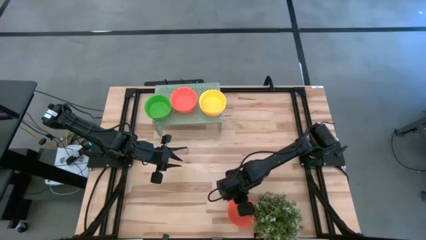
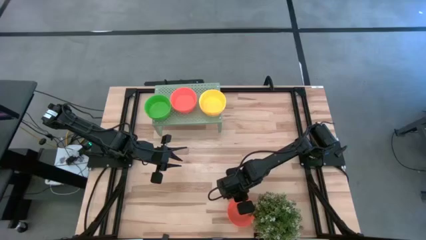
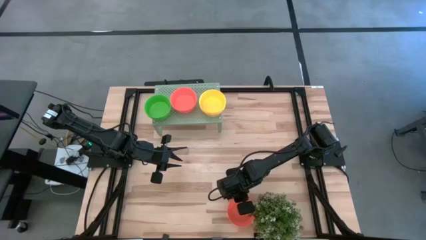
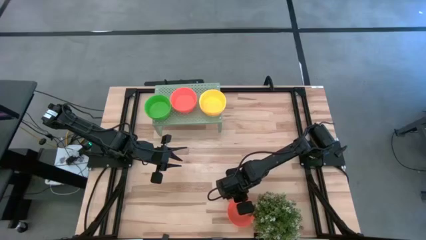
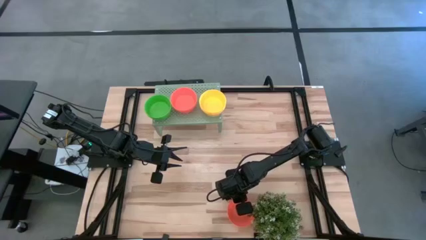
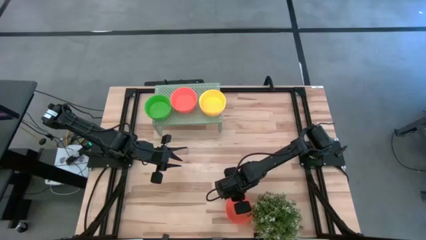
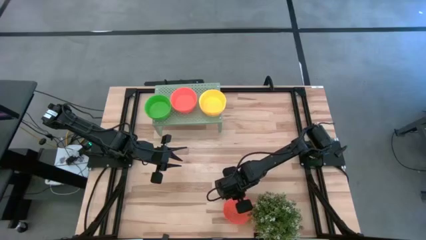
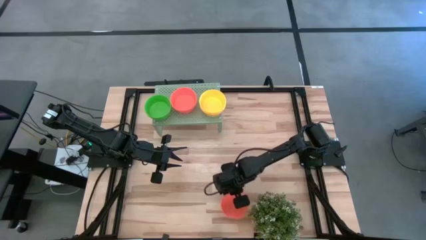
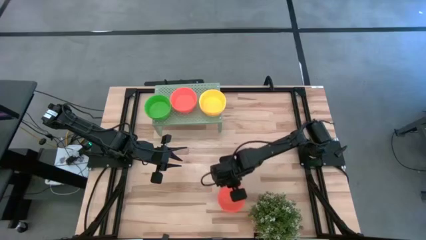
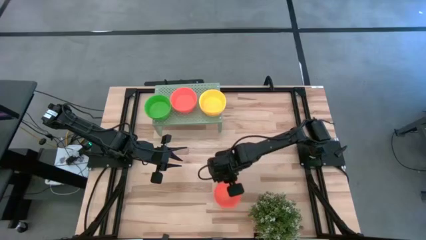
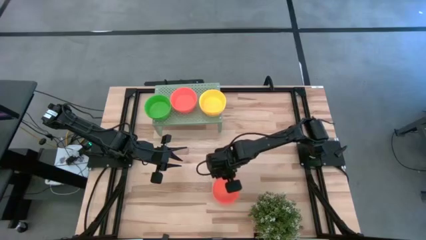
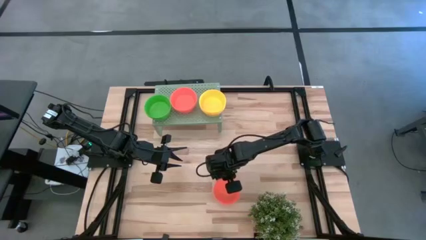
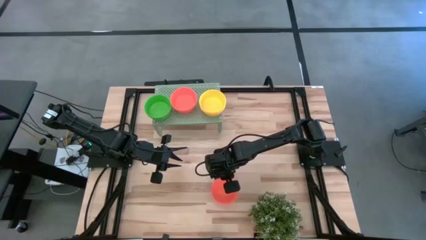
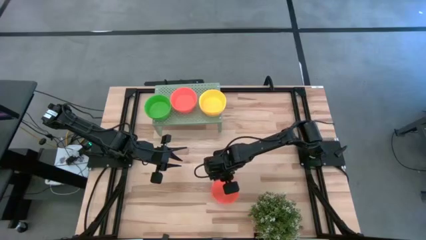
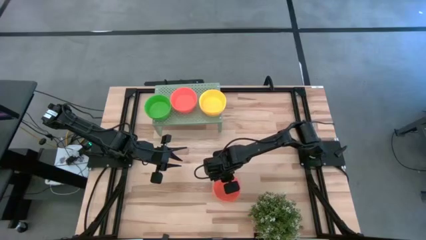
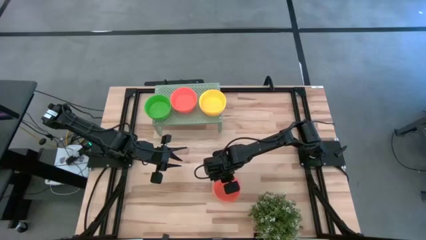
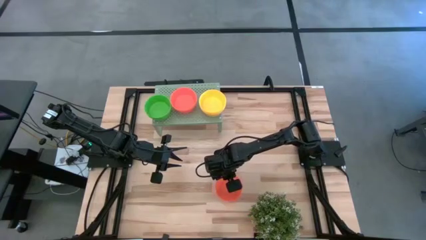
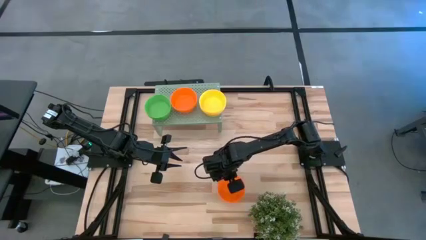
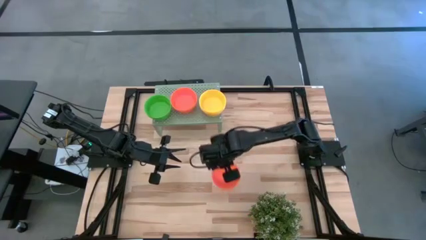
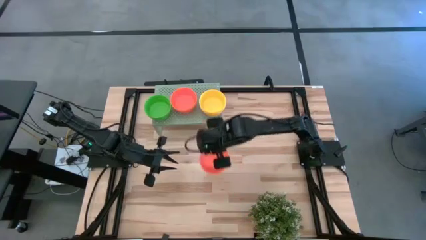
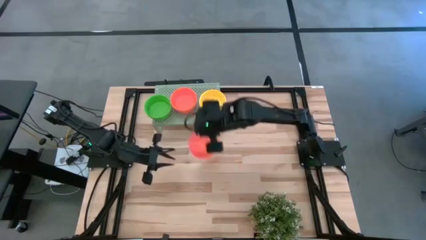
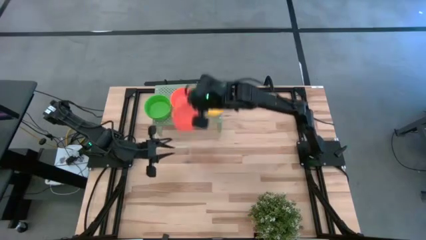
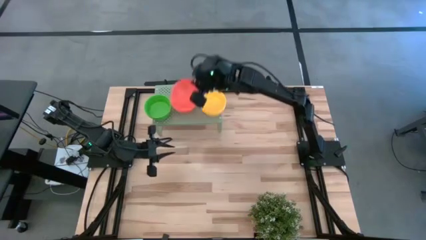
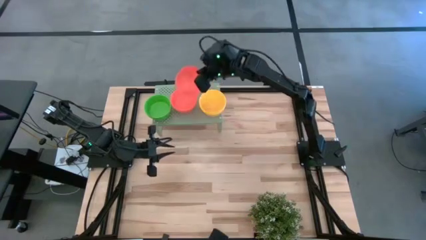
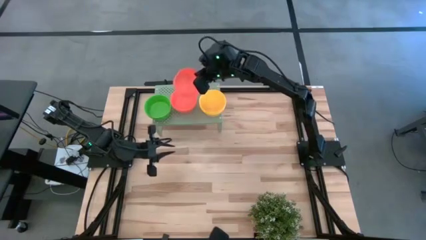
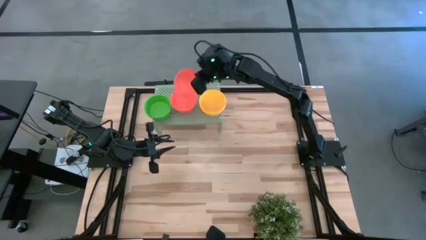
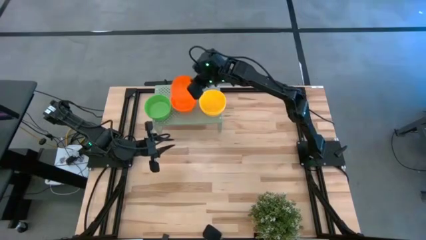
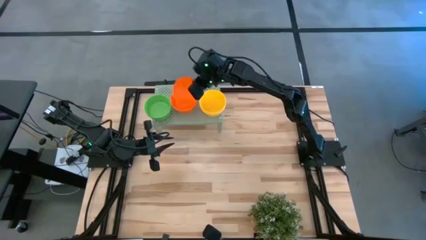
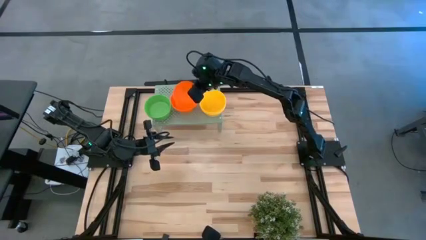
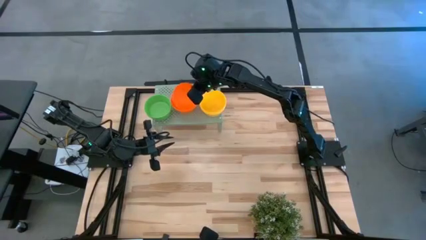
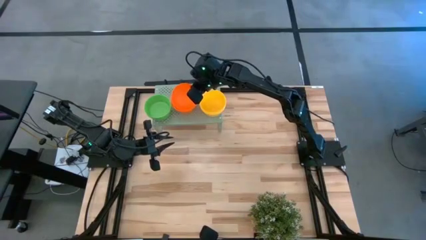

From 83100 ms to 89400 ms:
Task: Pick & Place Mini bowls
Stack the orange bowl on the orange bowl on the shelf

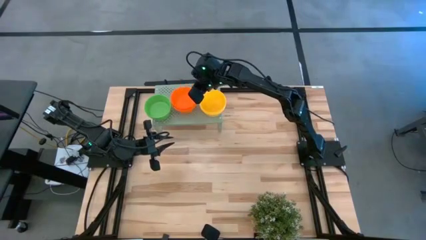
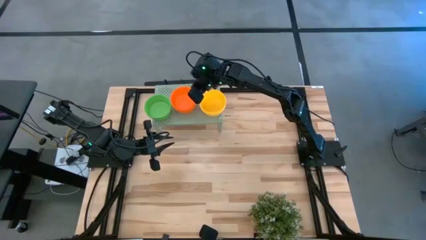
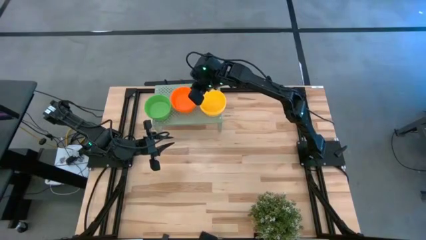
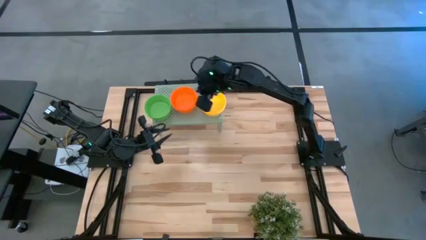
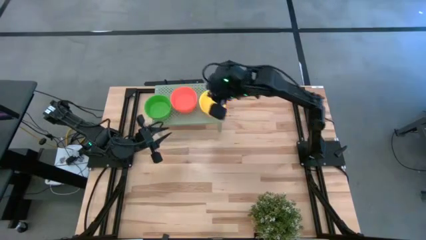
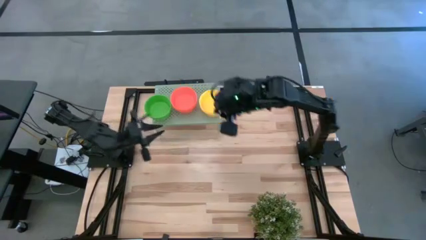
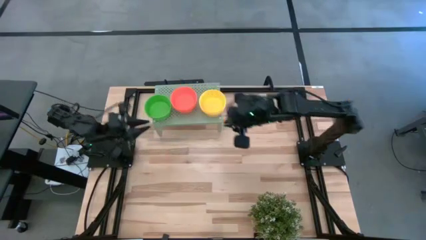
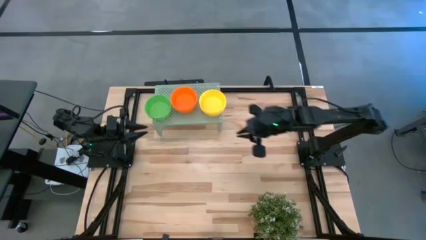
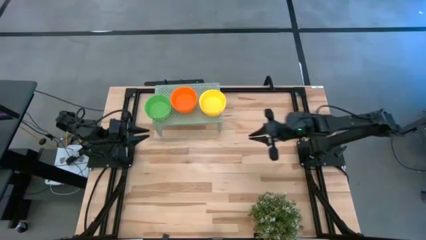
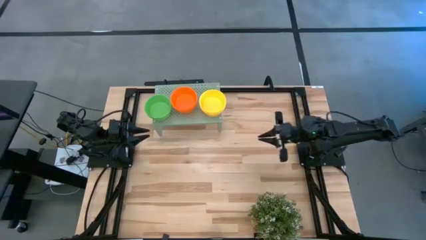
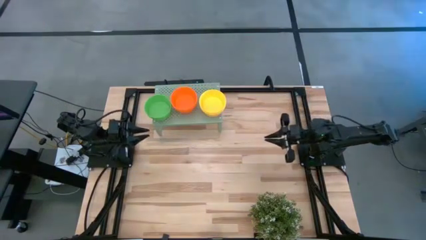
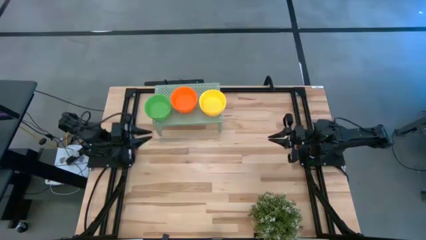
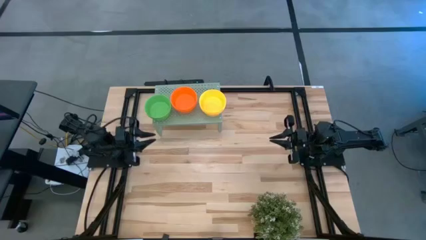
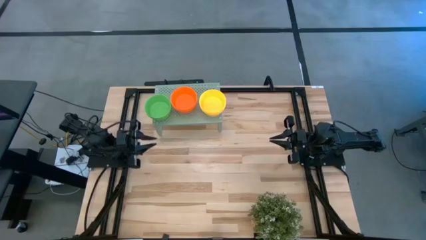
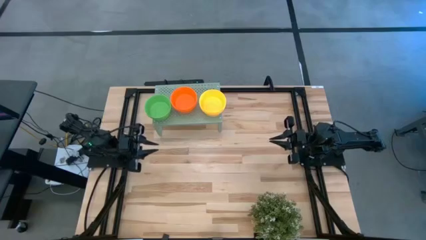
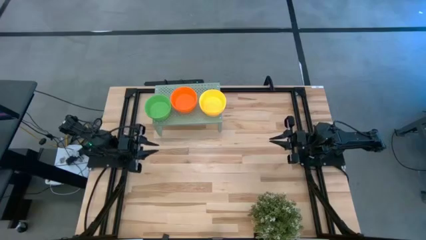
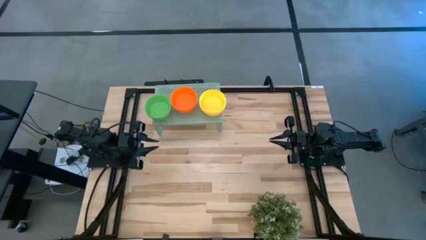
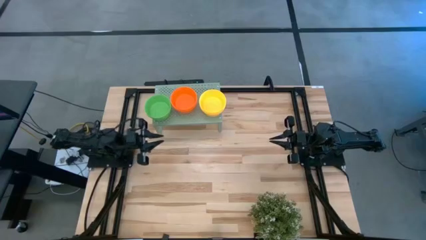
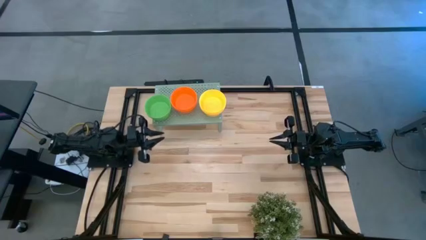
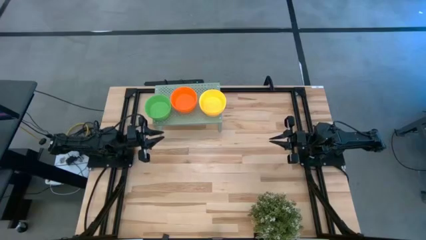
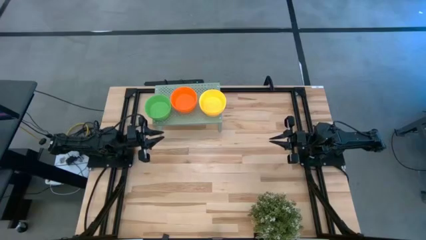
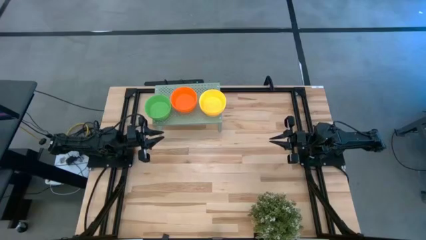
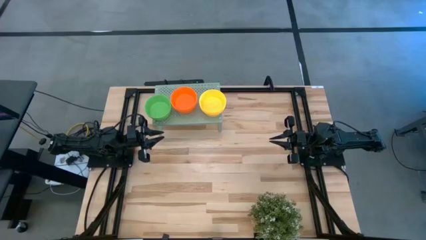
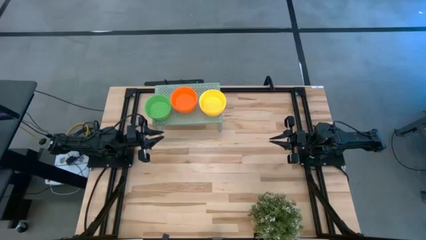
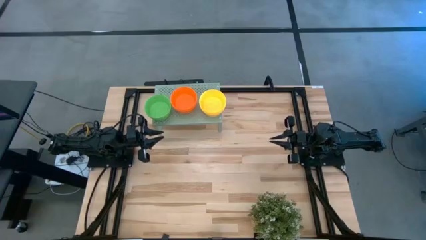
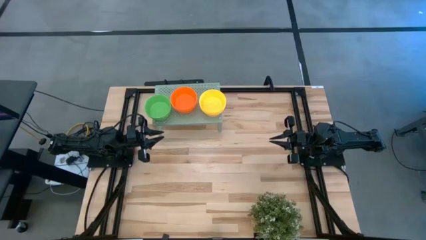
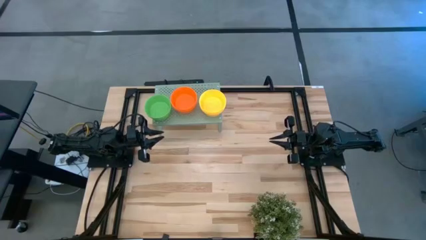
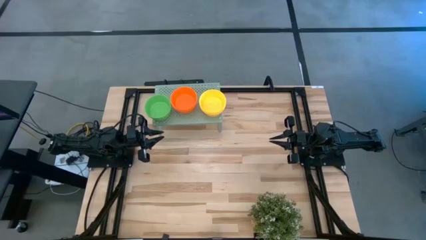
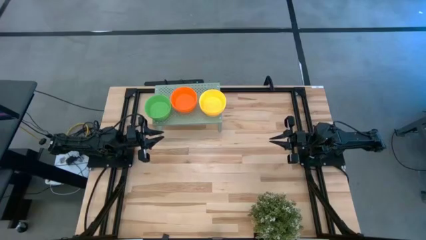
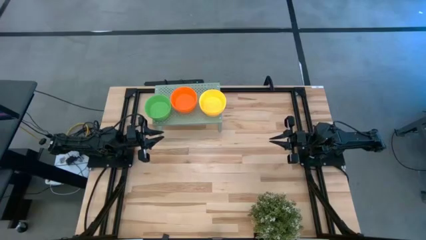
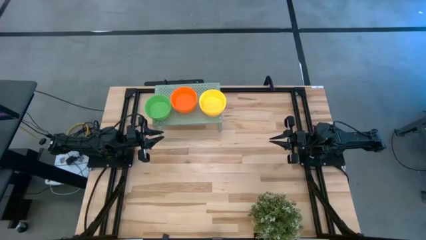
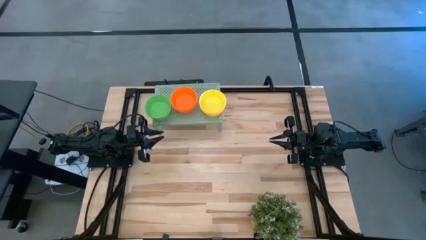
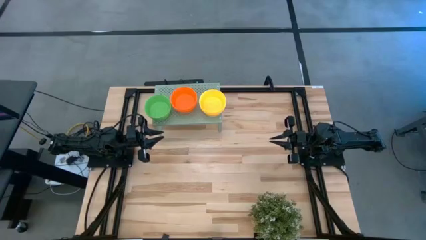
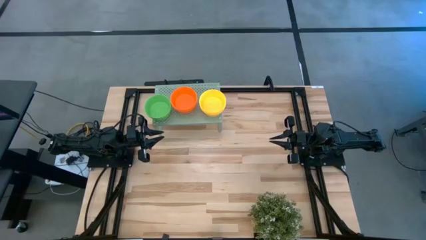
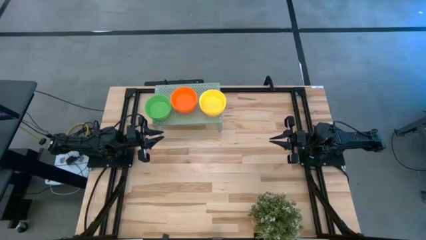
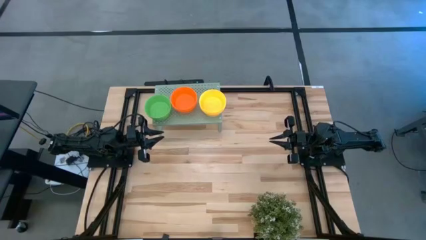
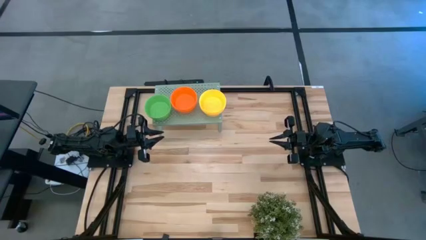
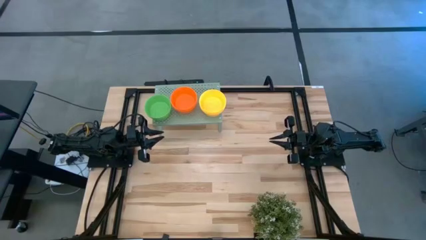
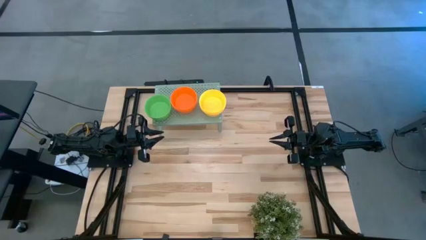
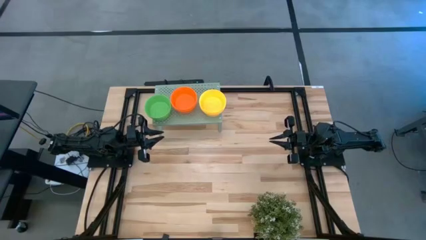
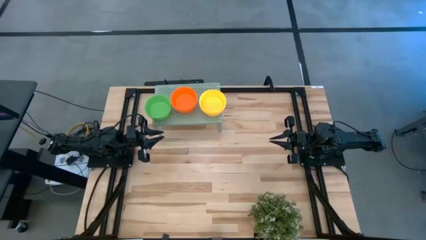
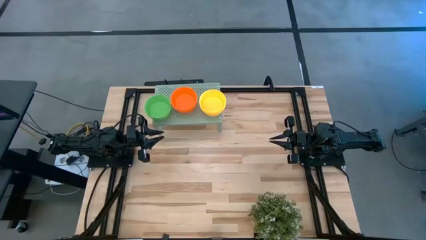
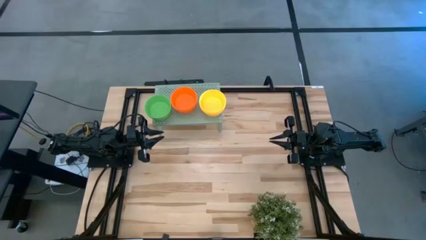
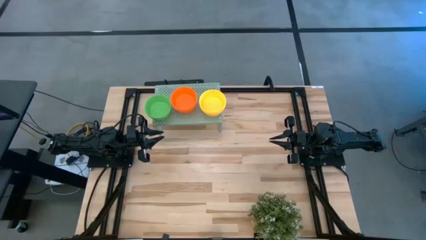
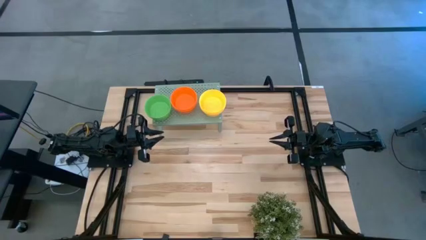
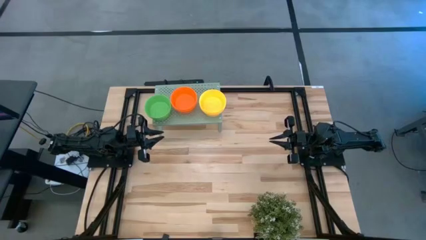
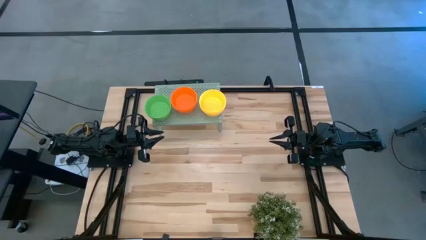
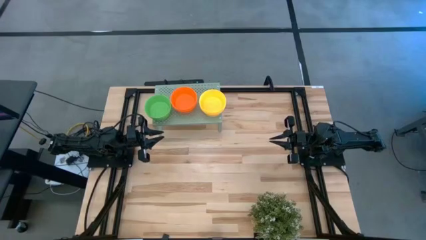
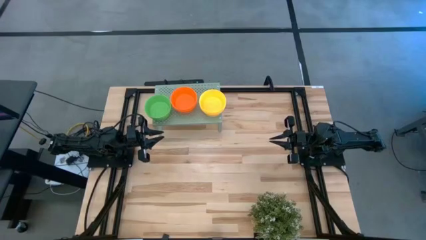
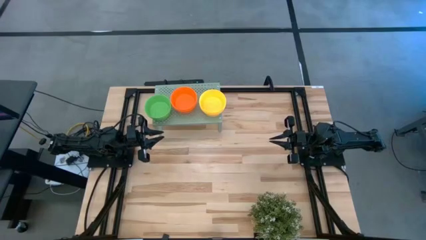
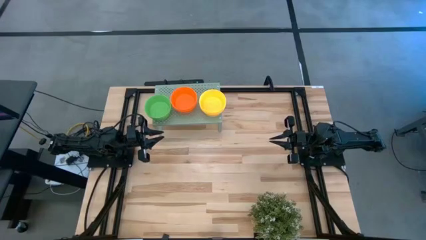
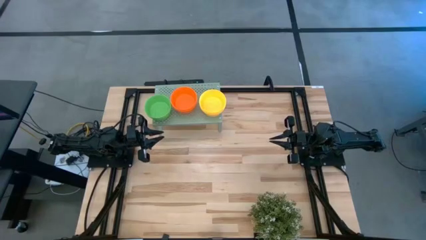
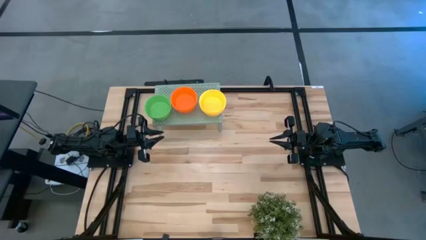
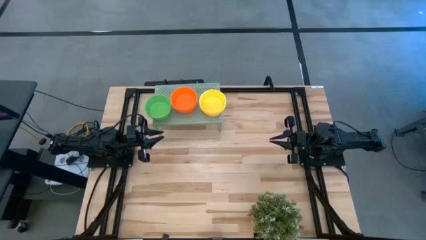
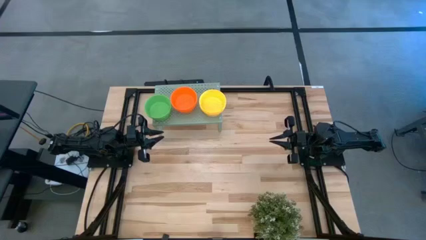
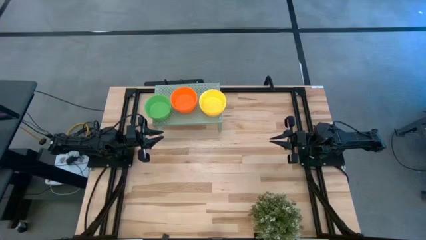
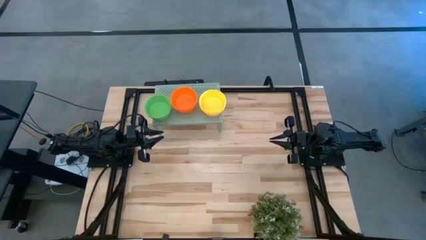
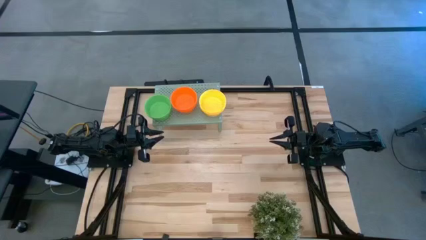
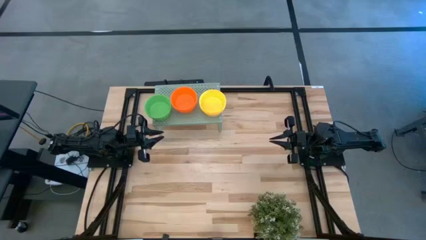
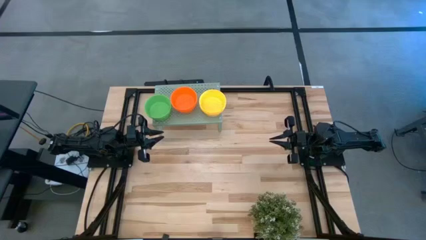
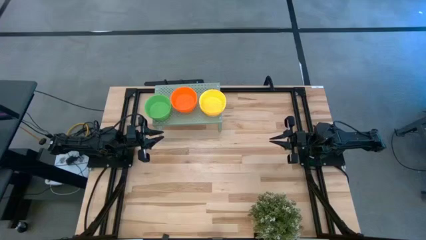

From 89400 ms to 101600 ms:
Return to Home Position
